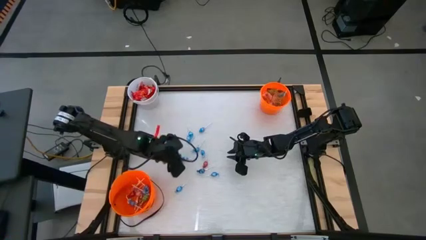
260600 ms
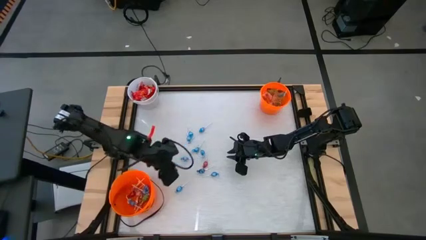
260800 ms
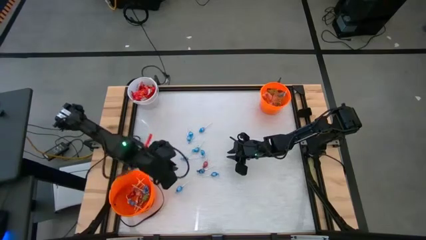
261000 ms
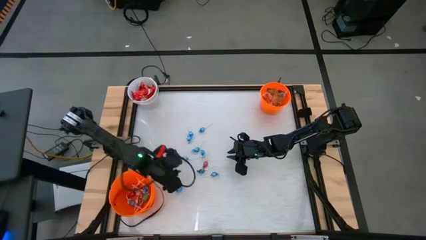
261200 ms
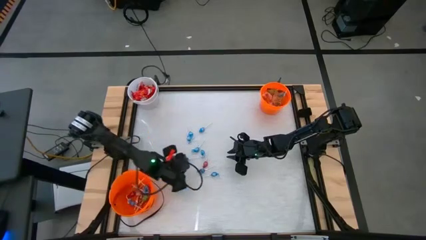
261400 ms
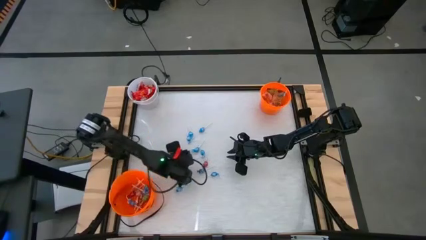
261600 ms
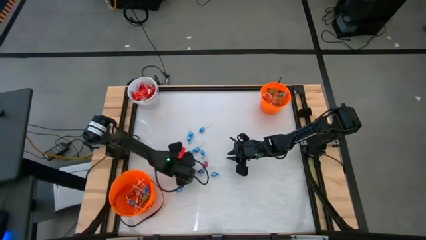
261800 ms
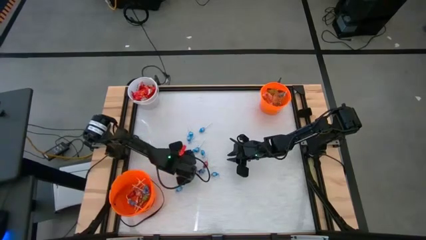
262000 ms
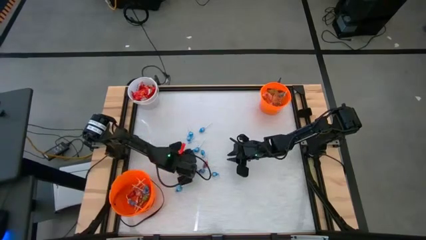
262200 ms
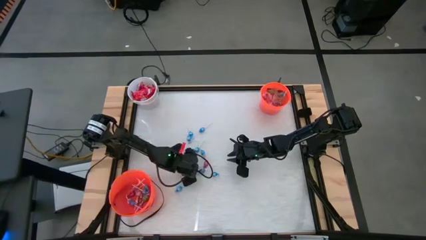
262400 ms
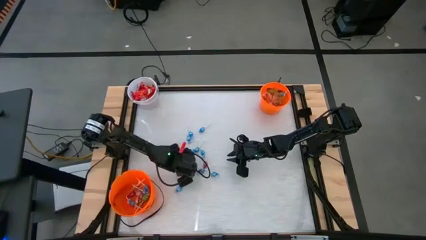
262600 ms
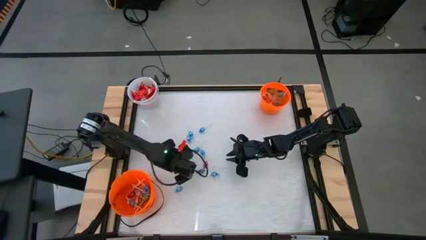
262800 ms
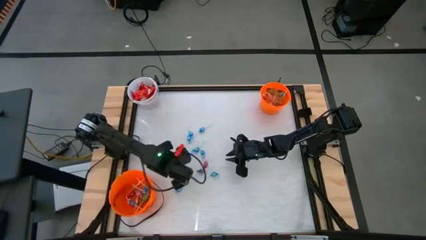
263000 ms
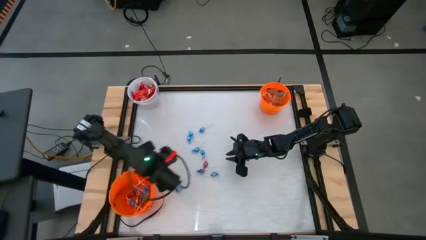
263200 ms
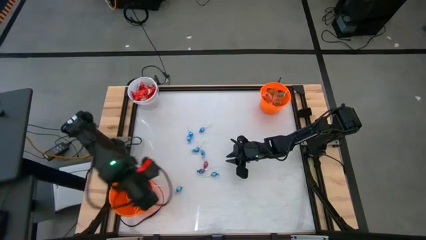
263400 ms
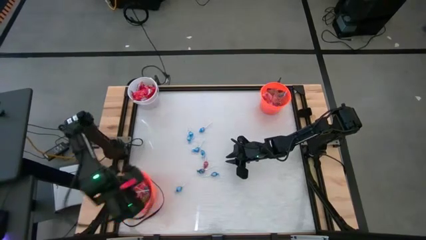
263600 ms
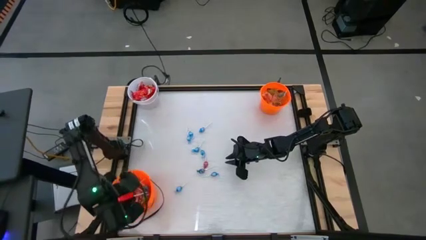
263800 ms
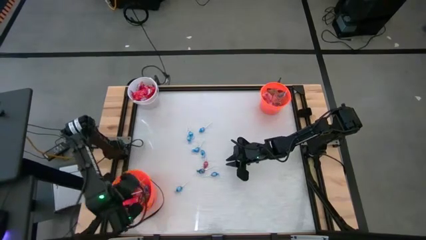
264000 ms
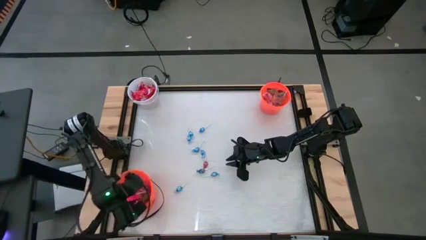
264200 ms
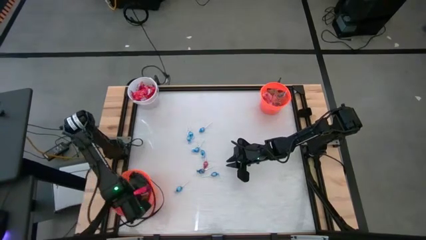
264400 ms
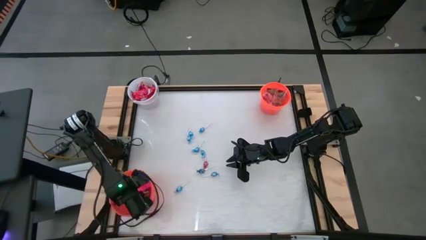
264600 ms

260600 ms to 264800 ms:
Task: Sort candy by brand, put in halloween buckets
Put the blue lollipop into the bottom orange bucket

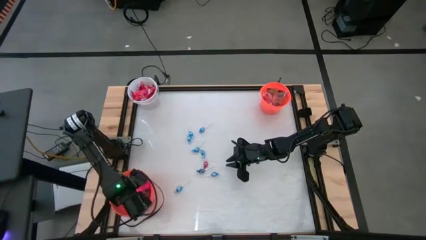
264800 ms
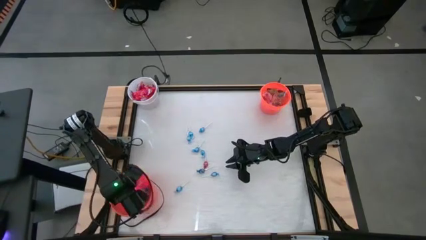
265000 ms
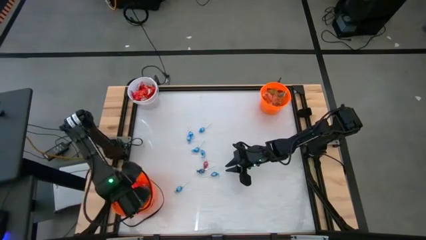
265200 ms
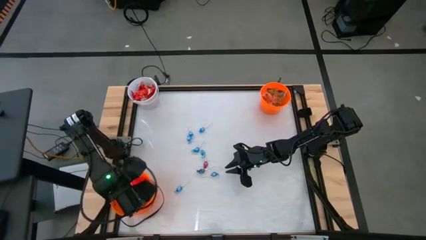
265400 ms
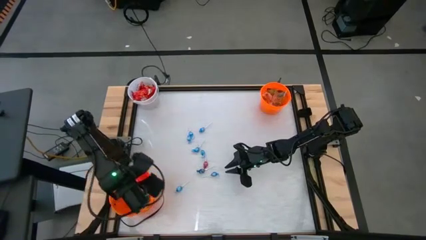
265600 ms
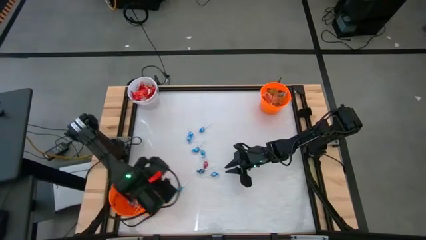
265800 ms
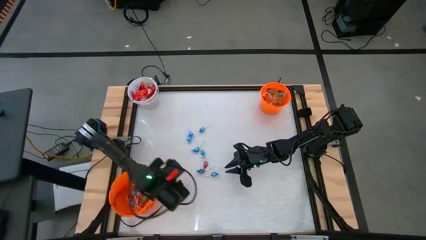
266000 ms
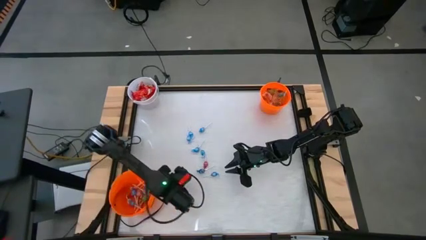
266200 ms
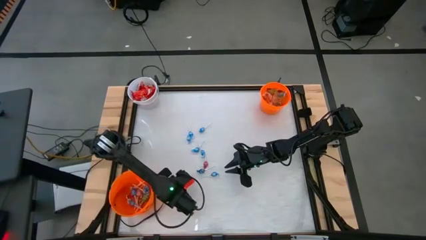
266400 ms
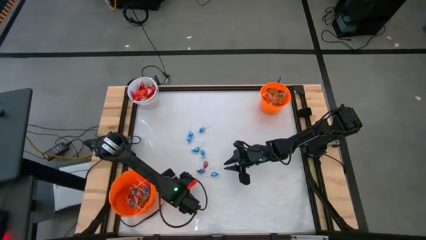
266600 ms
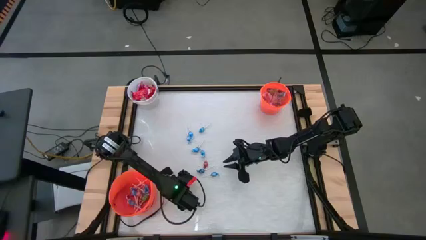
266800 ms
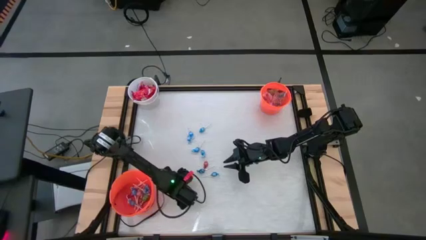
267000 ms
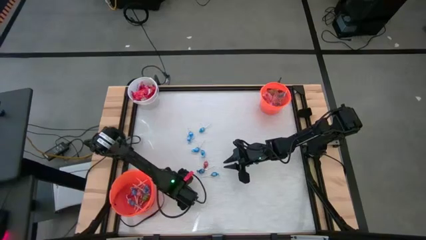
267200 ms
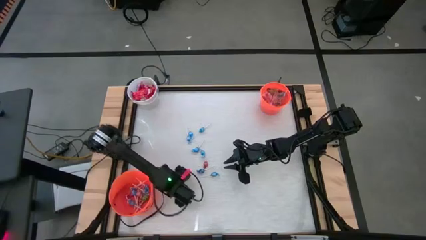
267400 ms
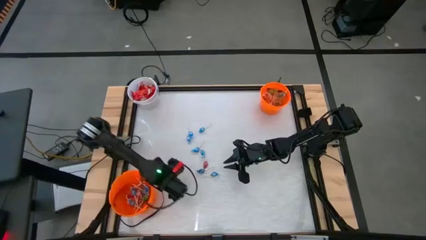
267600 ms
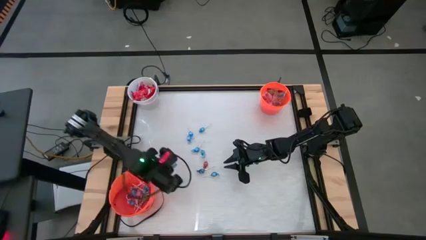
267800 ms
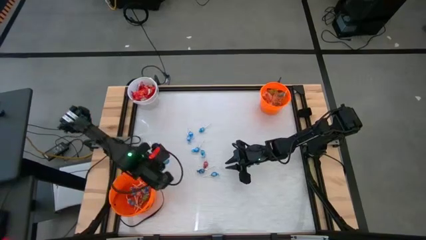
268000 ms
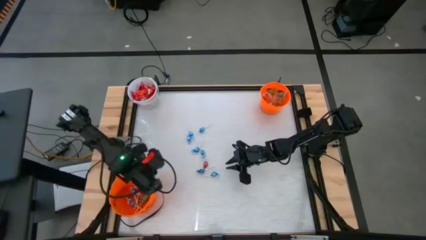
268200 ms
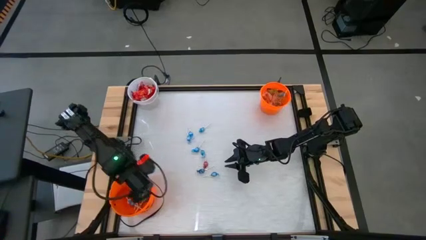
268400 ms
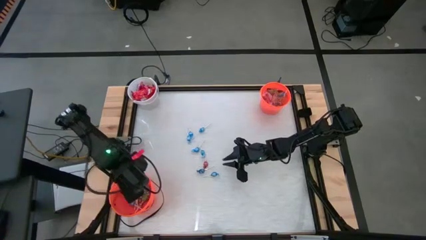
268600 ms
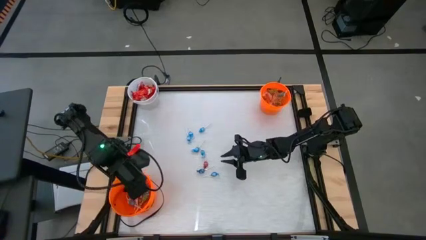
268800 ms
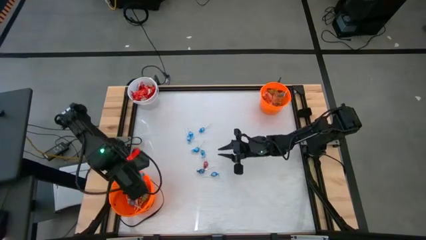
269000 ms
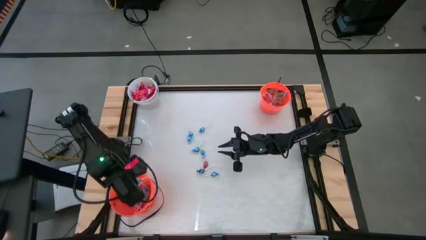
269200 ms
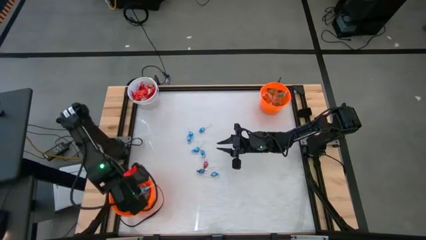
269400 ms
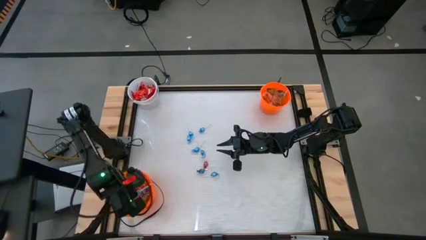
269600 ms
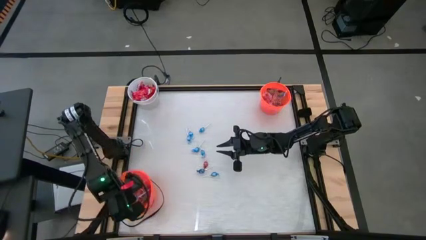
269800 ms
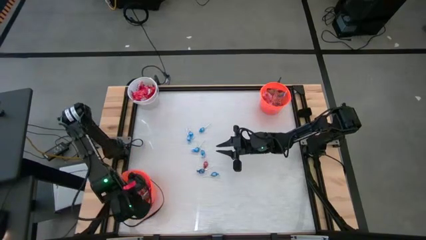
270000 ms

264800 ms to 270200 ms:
Put the blue lollipop into the bottom orange bucket

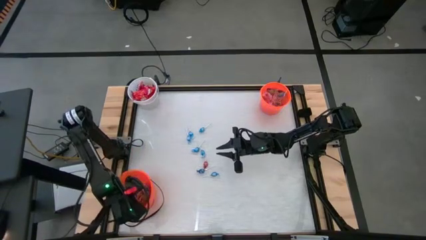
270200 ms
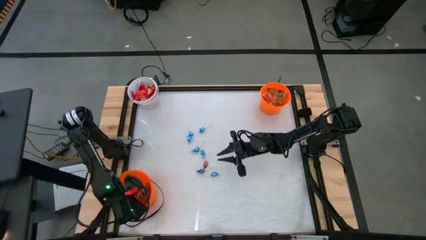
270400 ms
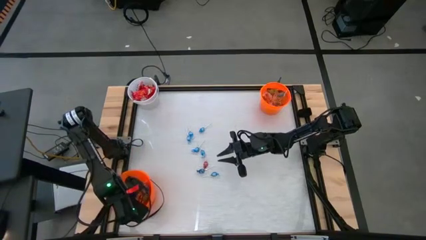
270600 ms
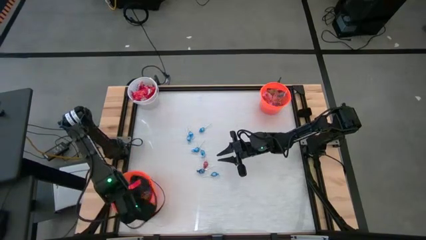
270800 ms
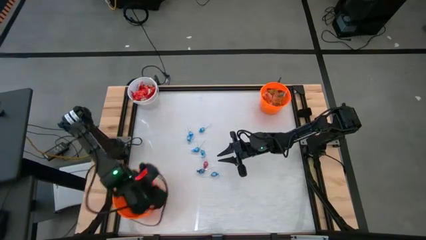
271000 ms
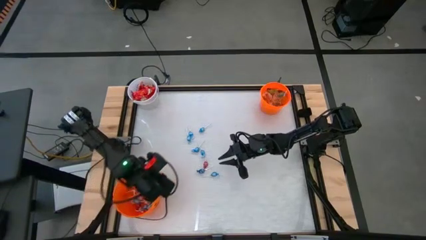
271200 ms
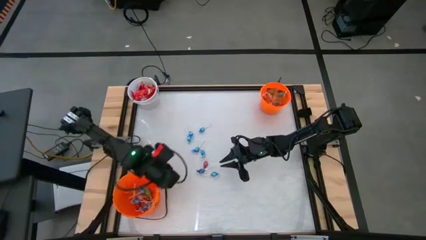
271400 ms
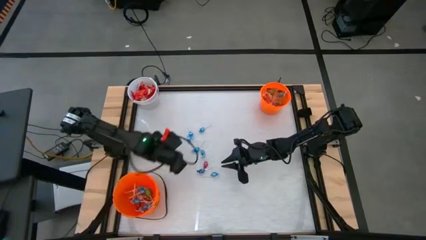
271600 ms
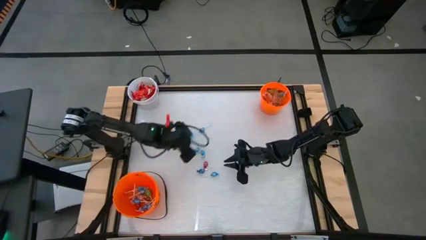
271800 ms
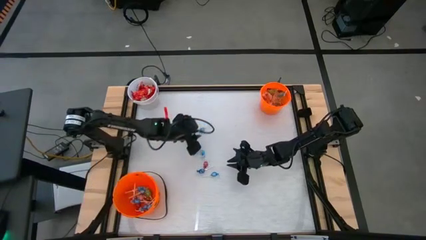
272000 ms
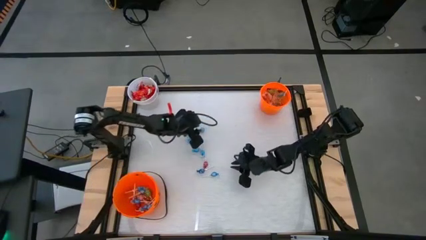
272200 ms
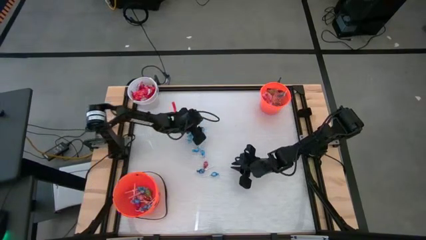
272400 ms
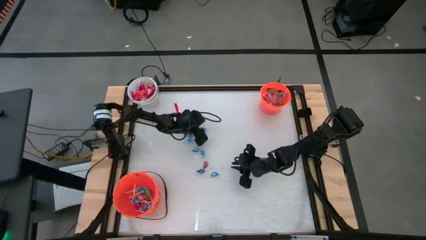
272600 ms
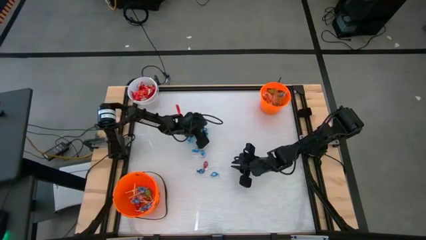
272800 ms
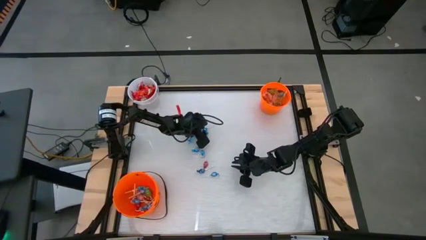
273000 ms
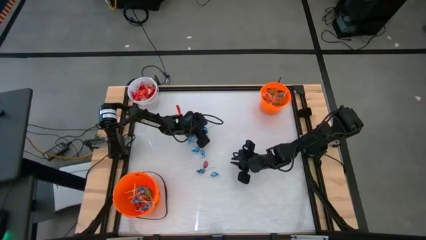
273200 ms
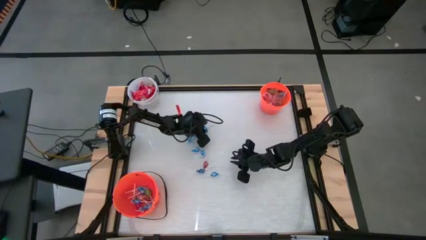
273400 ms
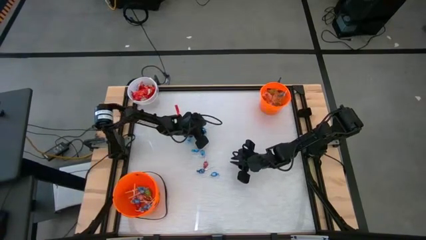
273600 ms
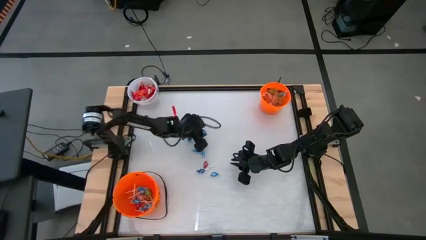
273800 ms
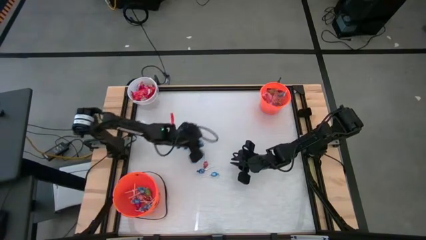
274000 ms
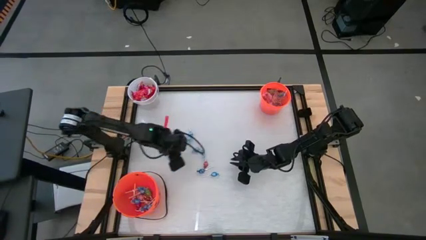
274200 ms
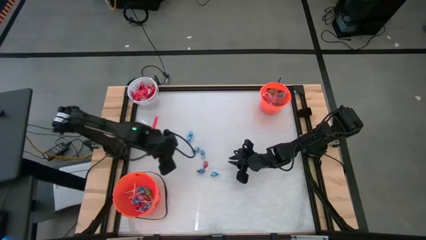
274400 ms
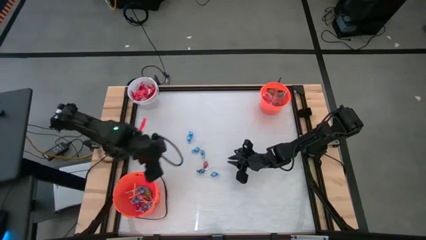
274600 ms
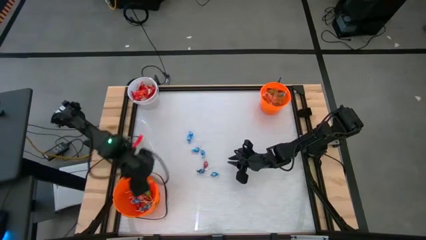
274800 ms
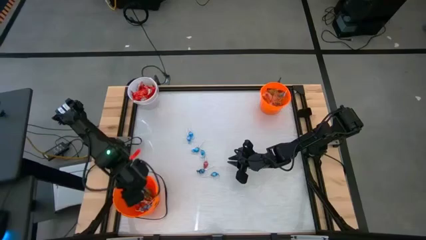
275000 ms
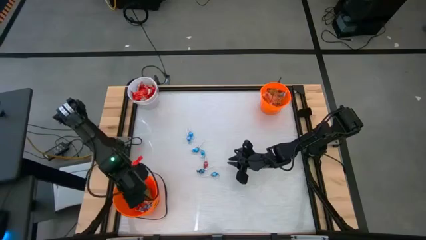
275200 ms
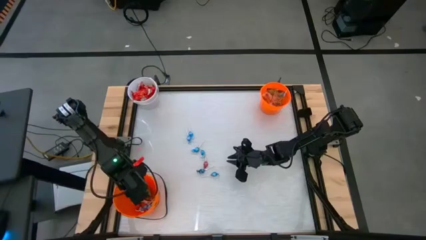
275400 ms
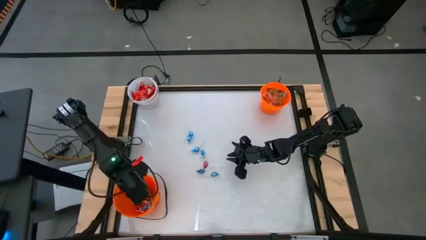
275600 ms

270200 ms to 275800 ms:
Put the blue lollipop into the bottom orange bucket

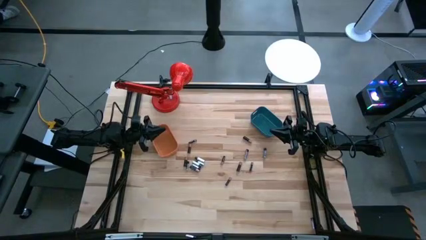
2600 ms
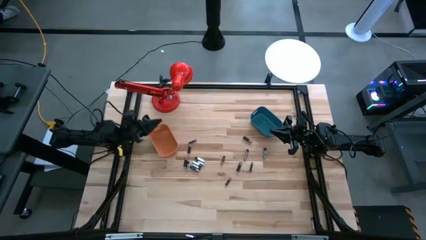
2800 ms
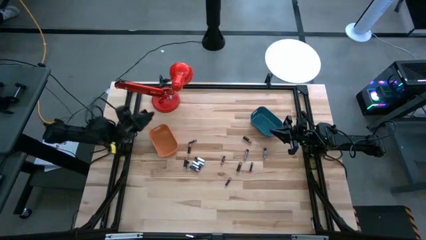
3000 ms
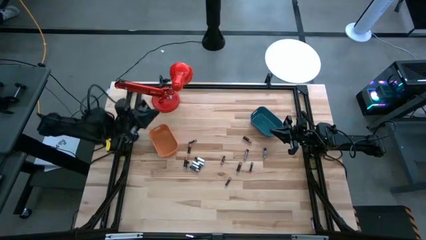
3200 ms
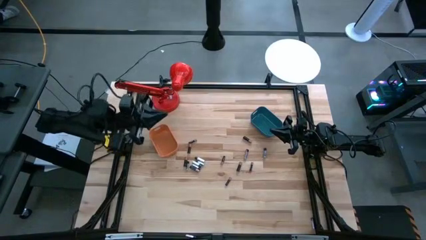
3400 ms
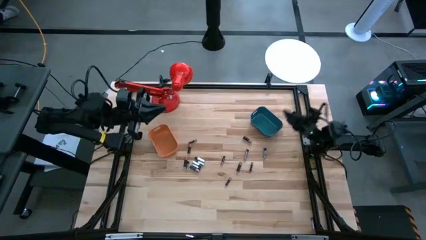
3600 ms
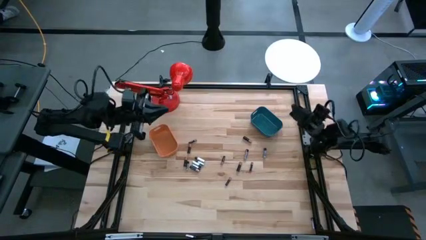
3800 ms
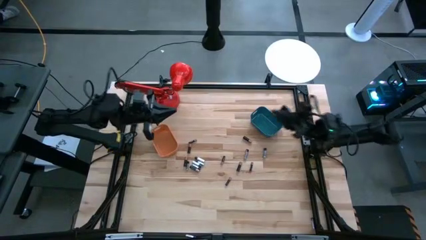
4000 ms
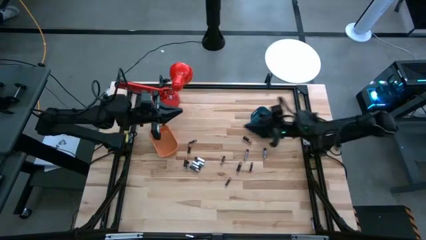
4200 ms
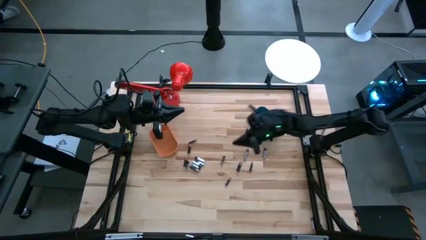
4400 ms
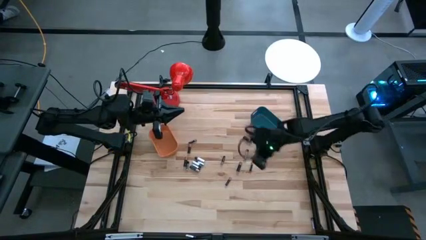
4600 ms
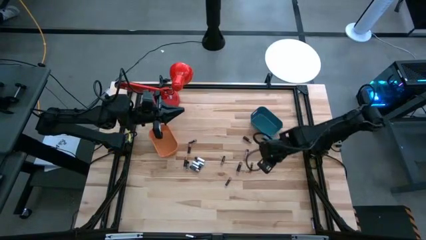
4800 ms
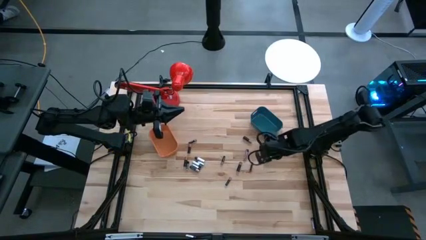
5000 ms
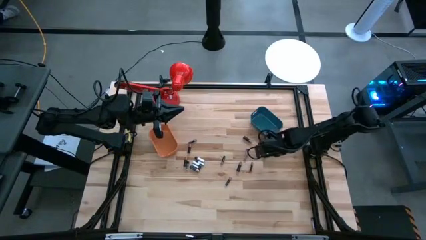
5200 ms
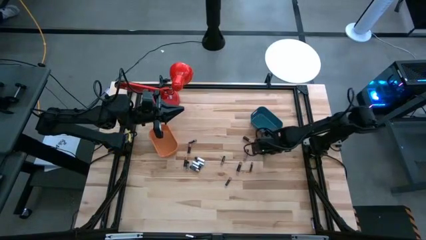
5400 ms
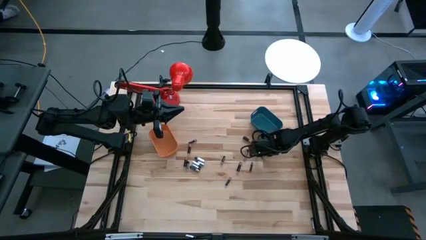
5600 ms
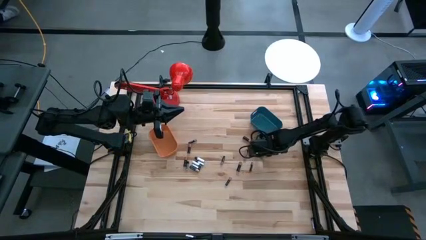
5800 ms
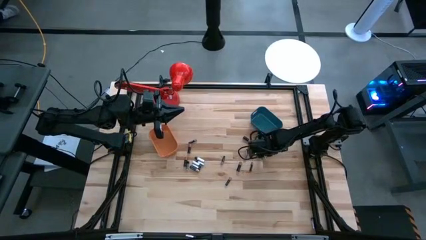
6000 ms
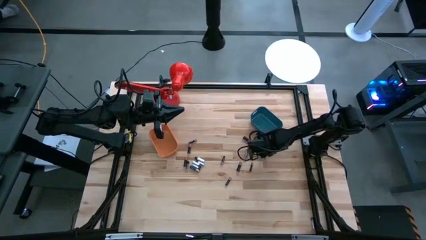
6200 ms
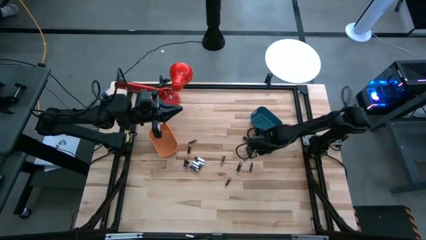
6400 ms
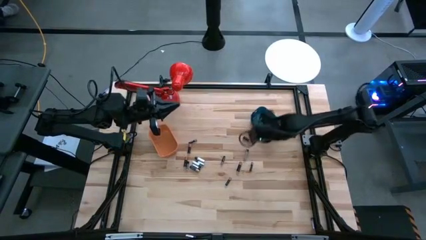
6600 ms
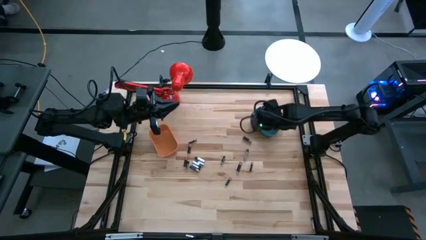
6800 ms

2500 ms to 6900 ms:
Task: Sort batteries
Put the silver battery into the blue bin
